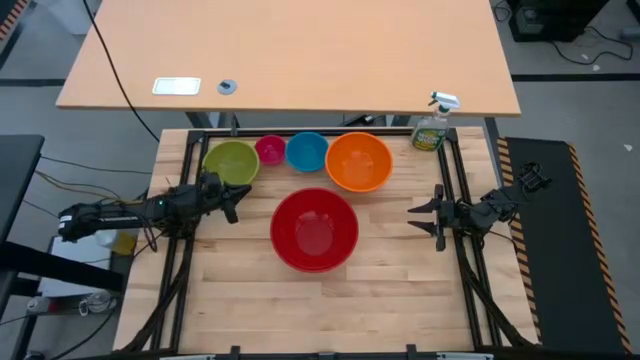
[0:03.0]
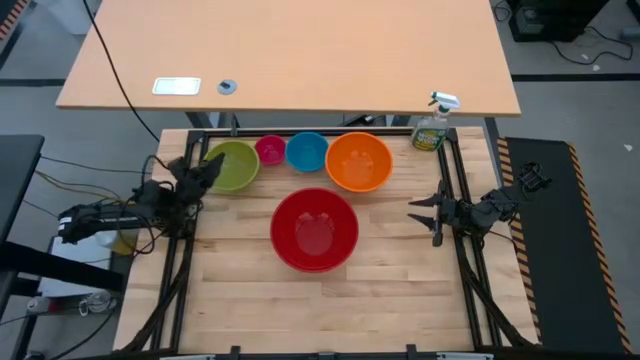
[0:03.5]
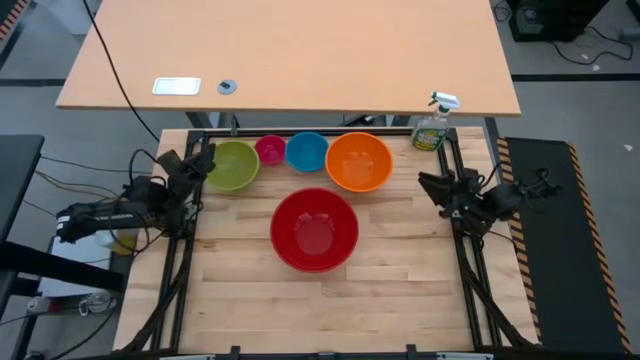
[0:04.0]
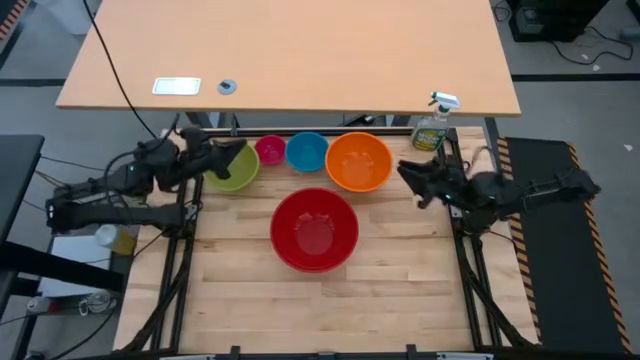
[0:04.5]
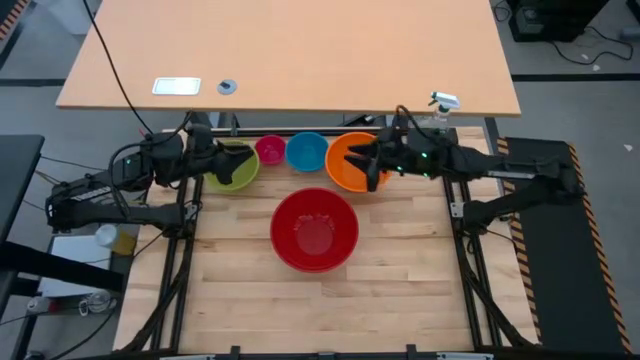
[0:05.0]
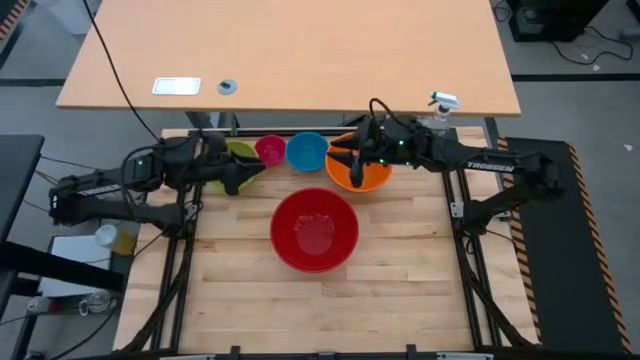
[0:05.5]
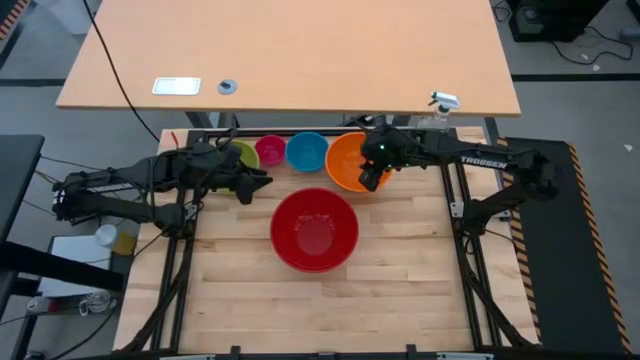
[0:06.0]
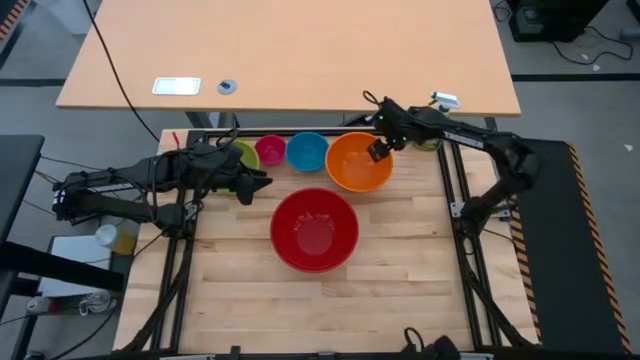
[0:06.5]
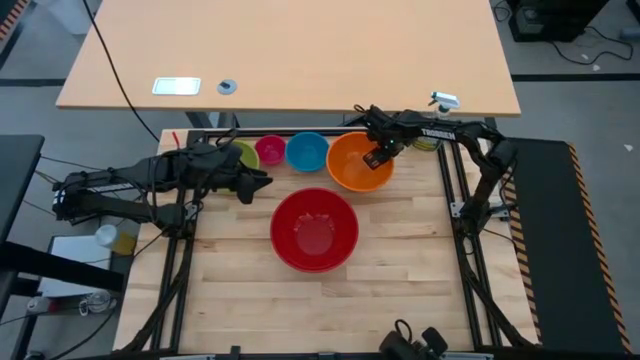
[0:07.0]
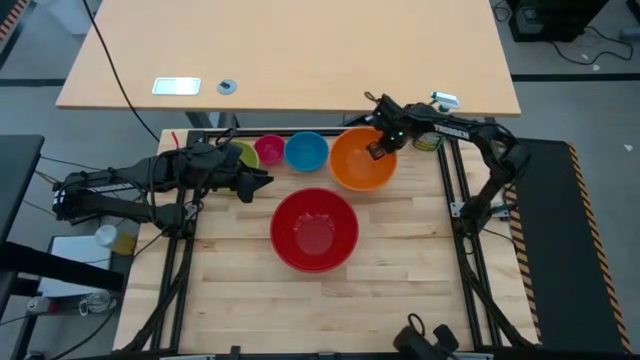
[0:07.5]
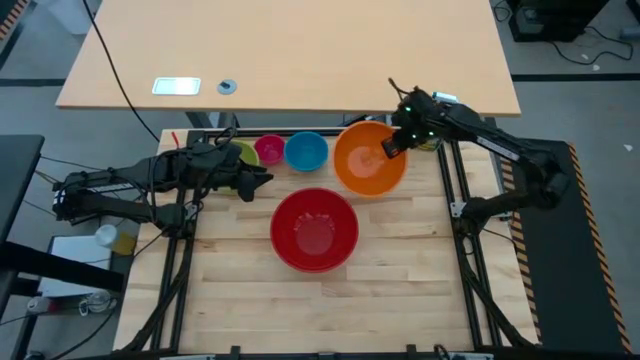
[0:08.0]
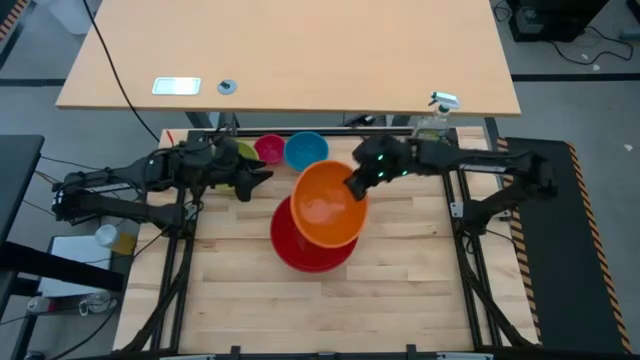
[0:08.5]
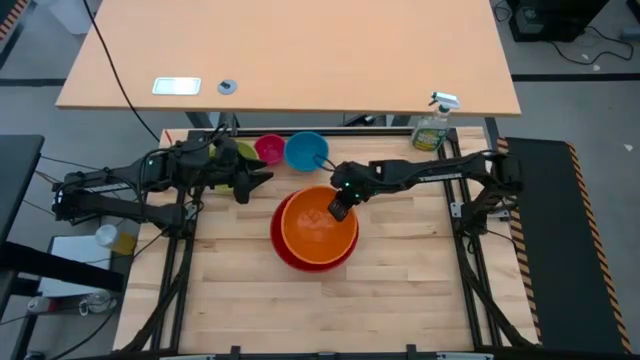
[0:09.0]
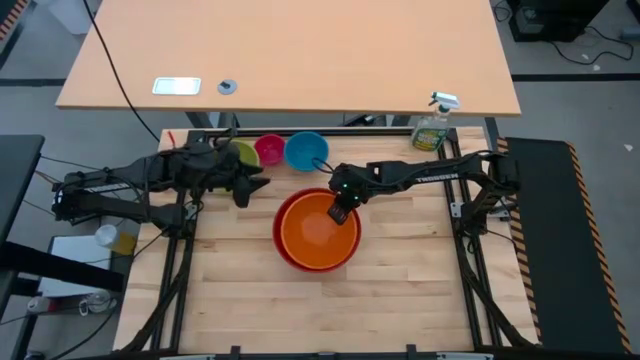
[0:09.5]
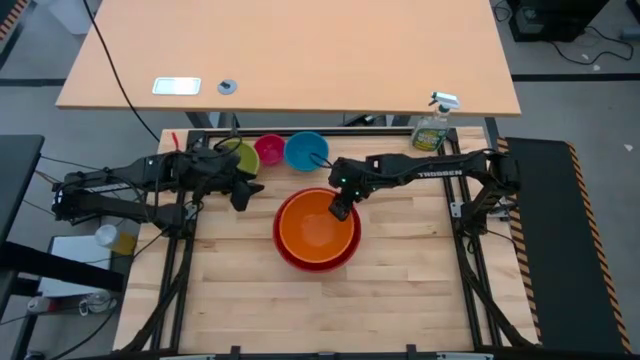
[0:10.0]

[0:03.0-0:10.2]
Stack the orange bowl on the red bowl

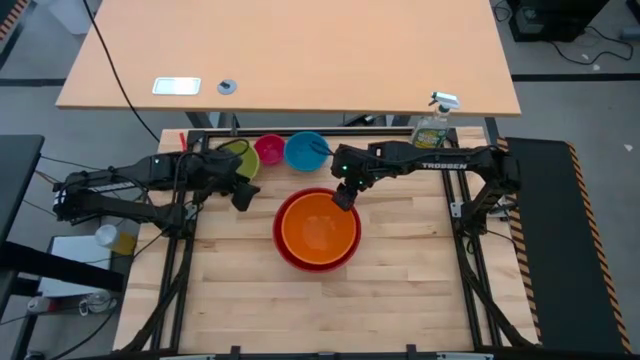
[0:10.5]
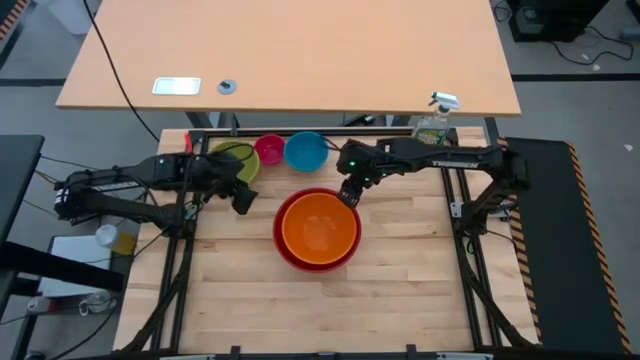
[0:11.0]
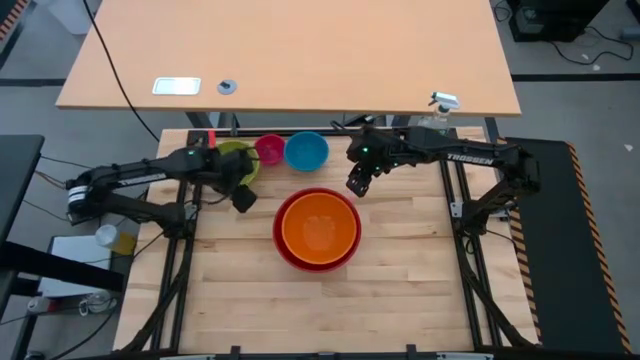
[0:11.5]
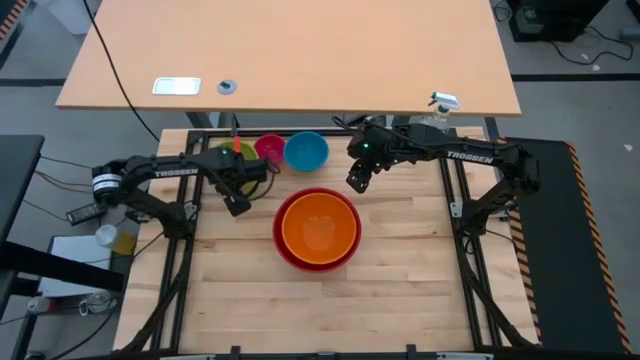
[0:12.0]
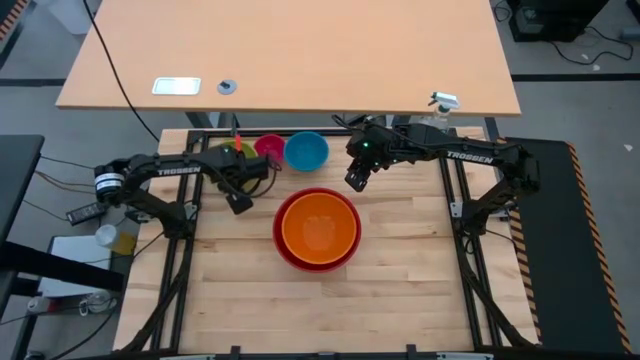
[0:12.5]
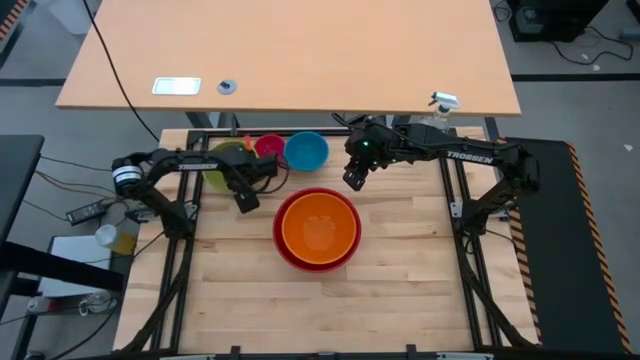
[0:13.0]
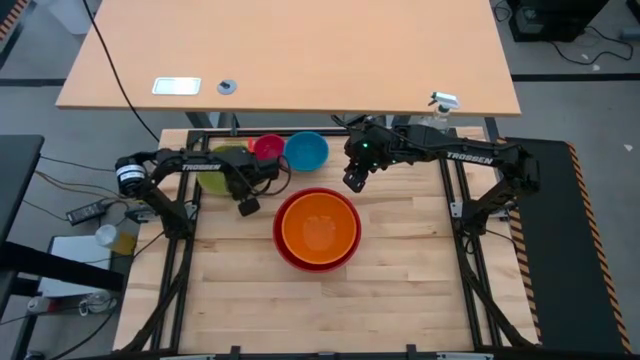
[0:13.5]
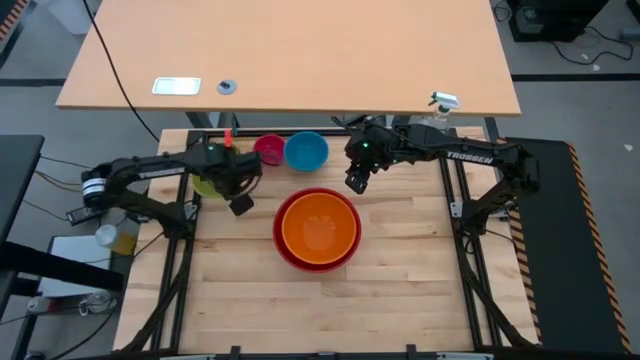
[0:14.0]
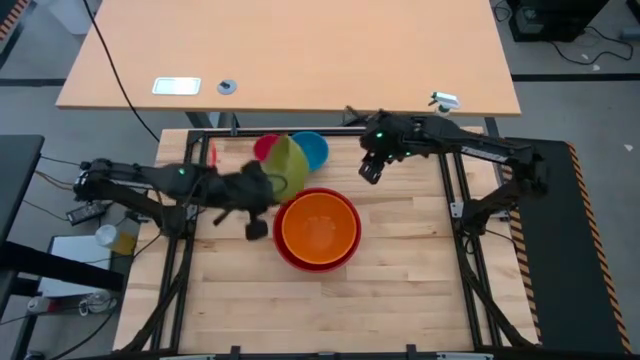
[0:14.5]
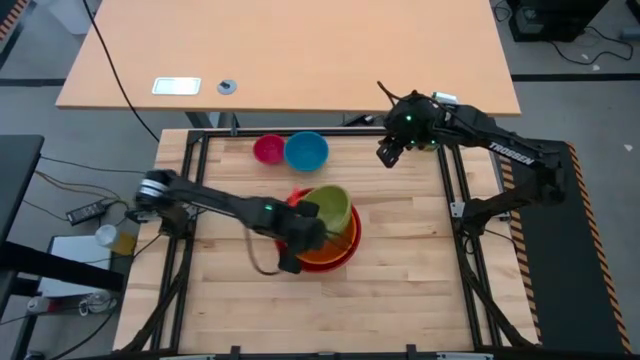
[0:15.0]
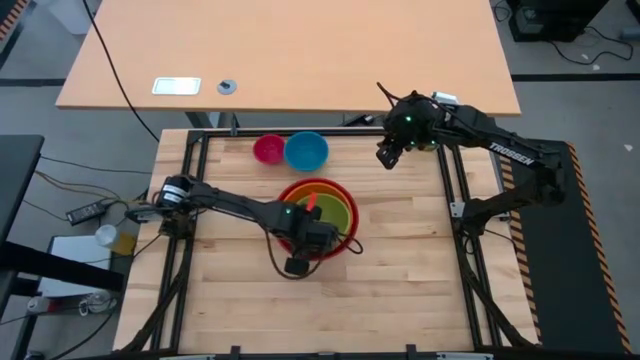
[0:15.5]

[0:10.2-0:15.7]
Stack the green bowl on the orange bowl

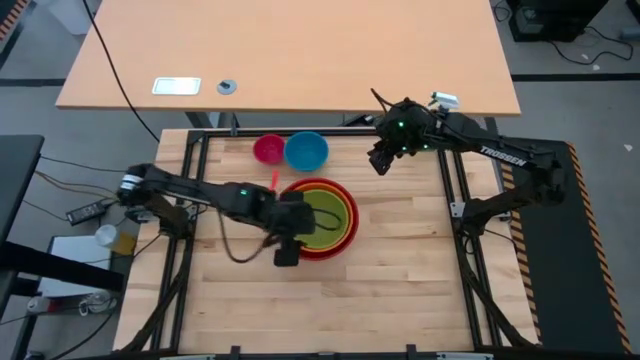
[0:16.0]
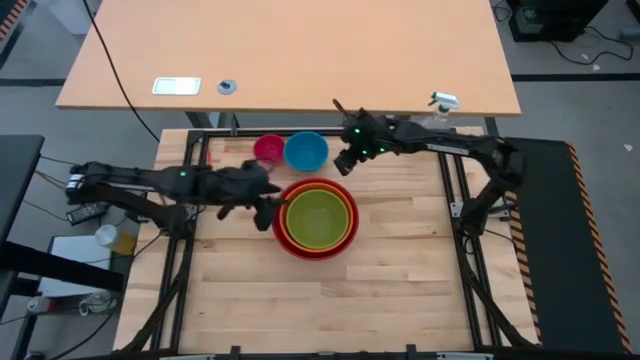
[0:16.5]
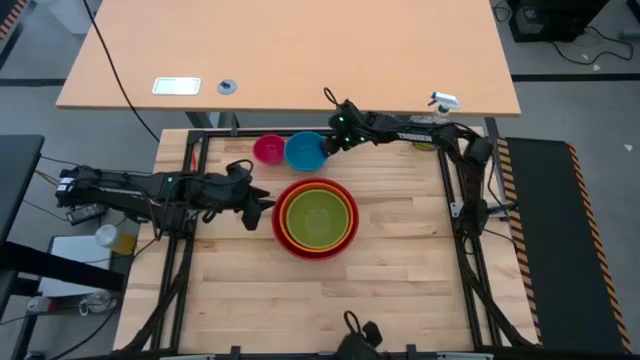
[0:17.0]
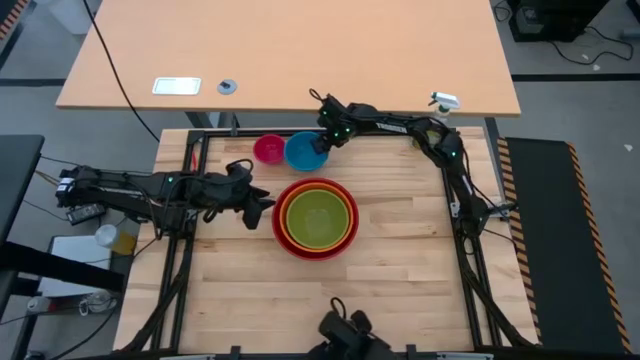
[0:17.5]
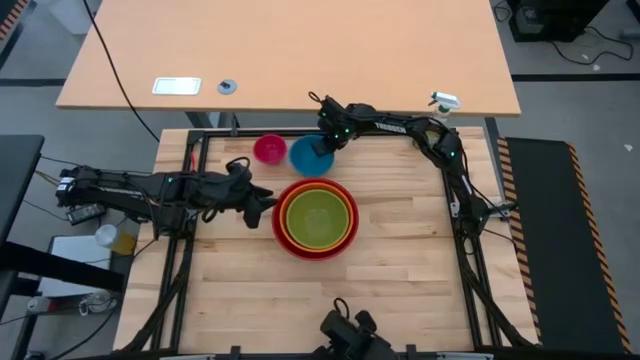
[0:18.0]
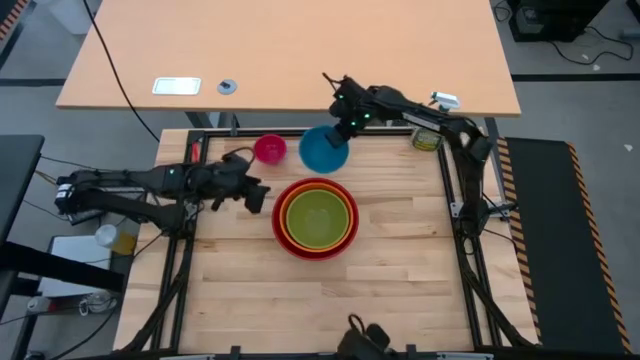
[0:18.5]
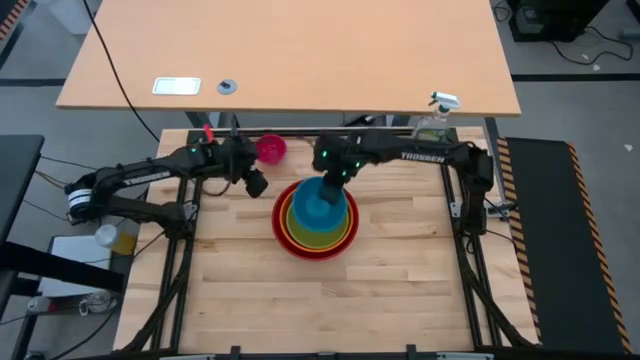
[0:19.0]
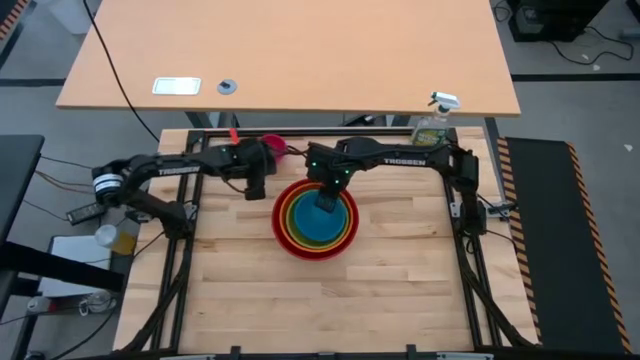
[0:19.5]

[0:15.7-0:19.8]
Stack the blue bowl on the green bowl

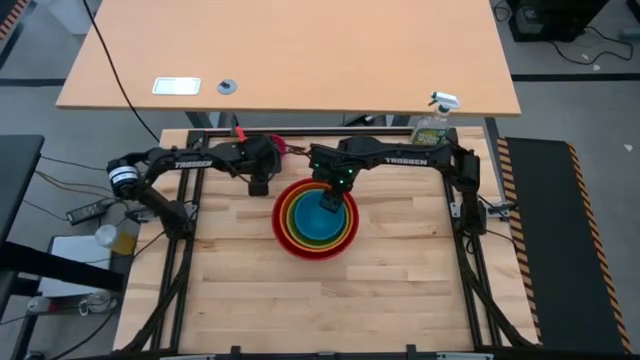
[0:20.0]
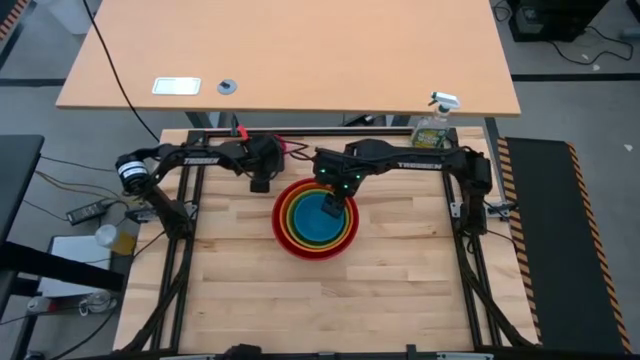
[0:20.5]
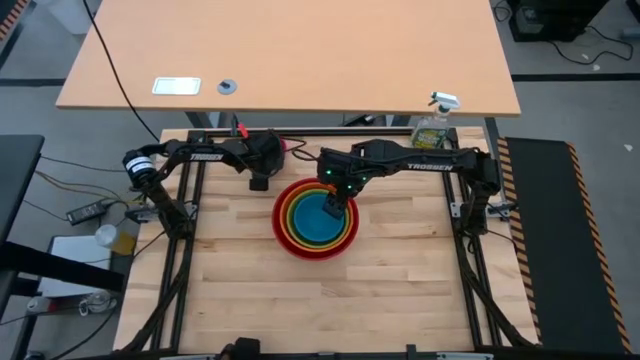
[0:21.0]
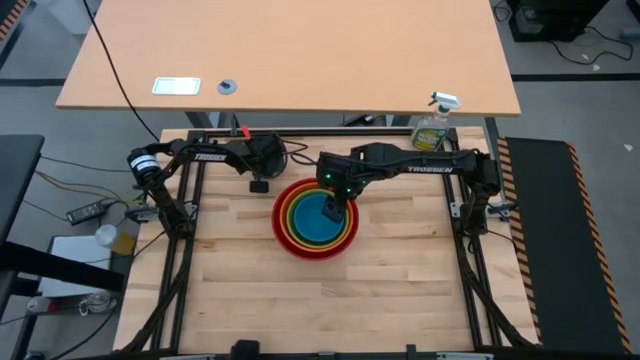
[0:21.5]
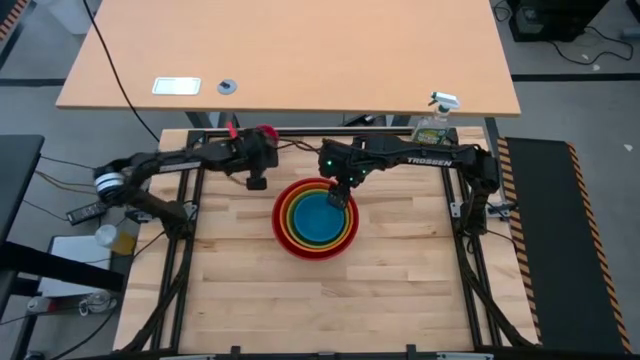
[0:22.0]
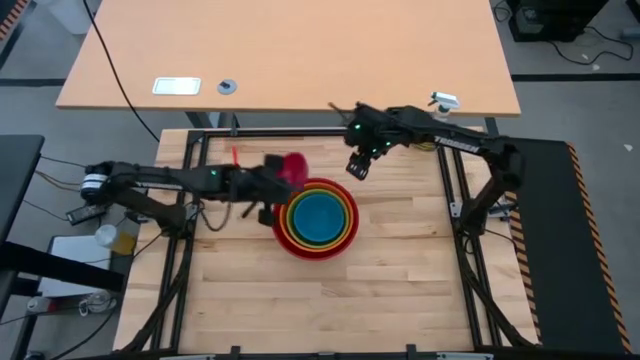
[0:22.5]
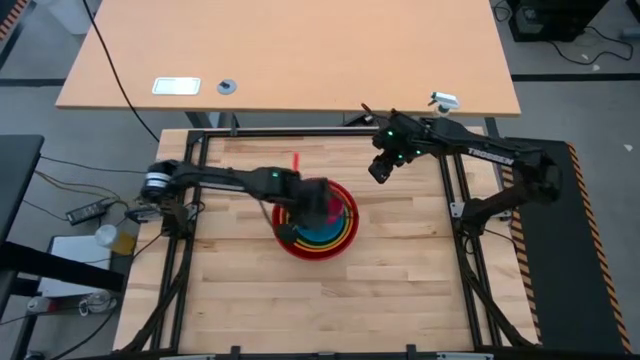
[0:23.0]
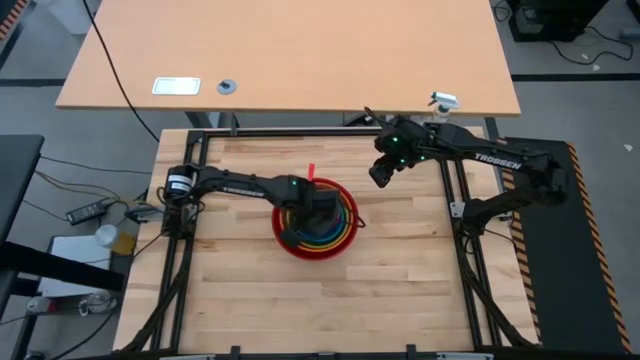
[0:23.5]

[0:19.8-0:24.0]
Stack the pink bowl on the blue bowl
